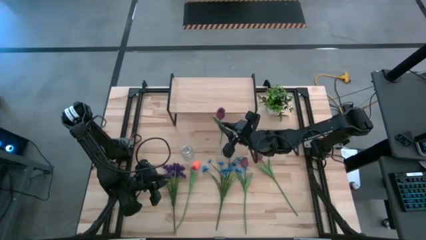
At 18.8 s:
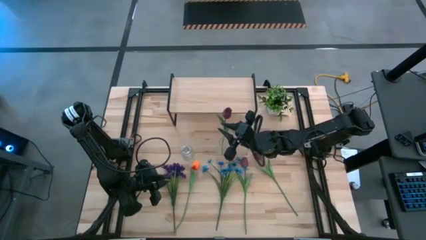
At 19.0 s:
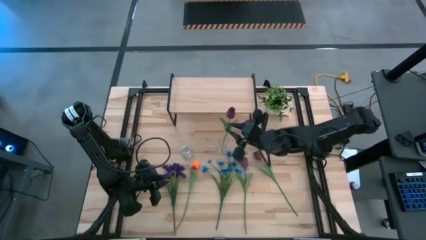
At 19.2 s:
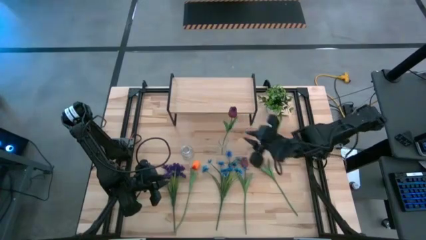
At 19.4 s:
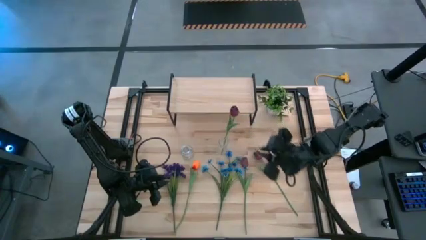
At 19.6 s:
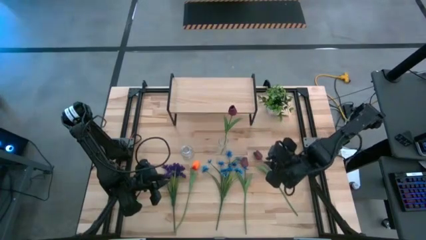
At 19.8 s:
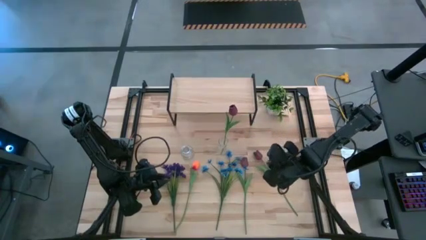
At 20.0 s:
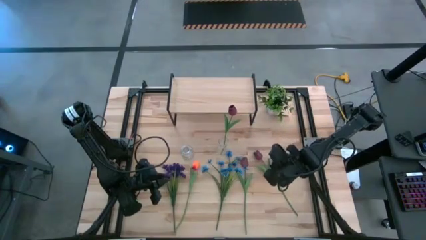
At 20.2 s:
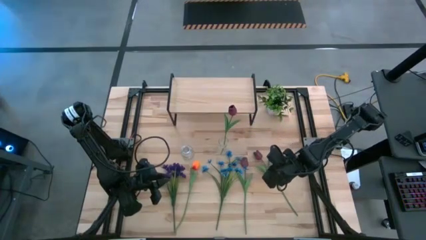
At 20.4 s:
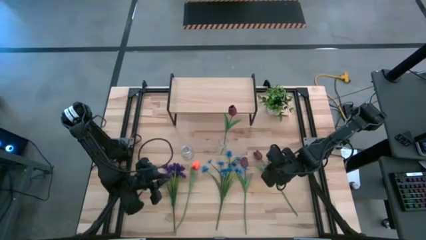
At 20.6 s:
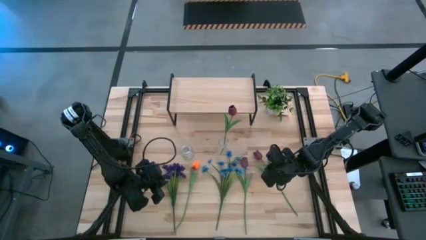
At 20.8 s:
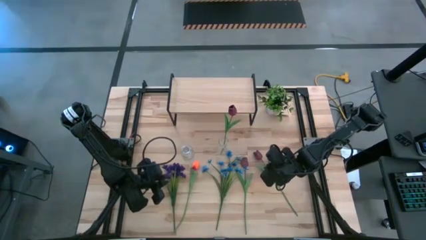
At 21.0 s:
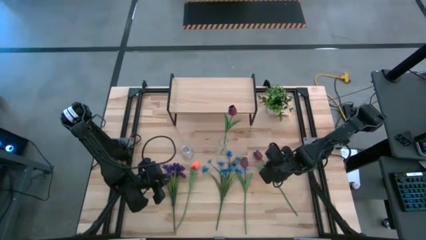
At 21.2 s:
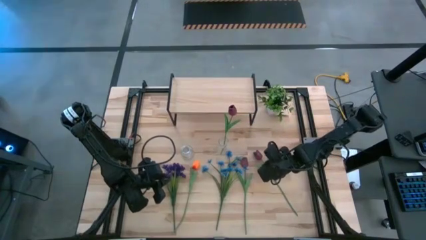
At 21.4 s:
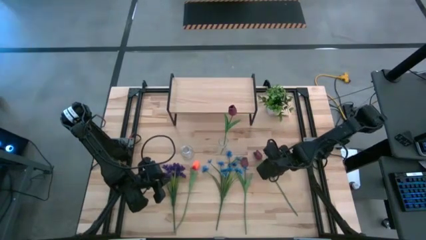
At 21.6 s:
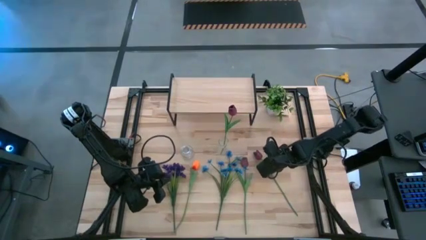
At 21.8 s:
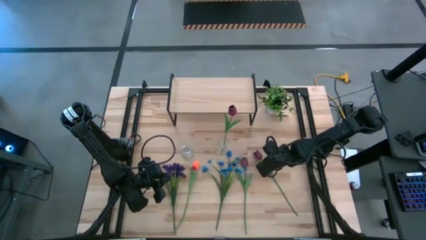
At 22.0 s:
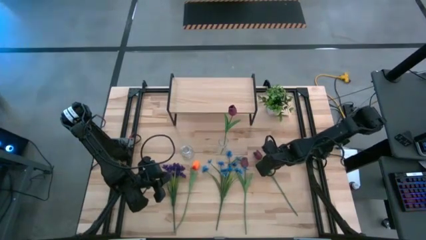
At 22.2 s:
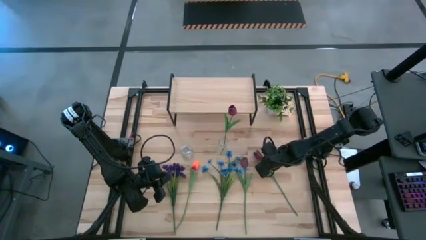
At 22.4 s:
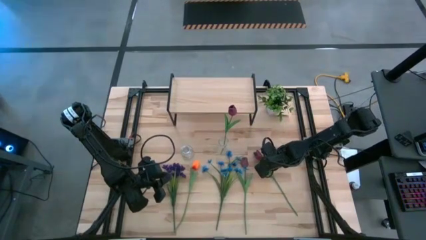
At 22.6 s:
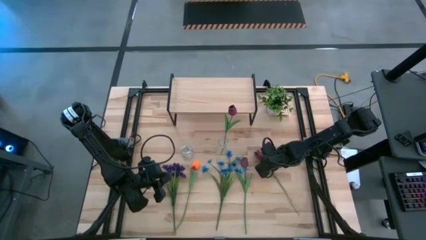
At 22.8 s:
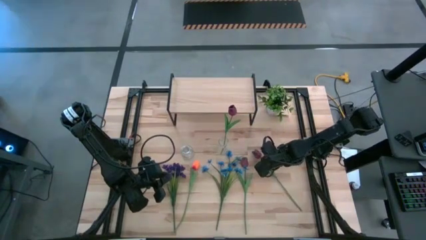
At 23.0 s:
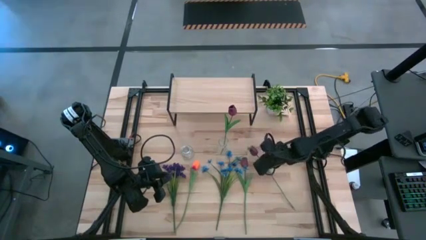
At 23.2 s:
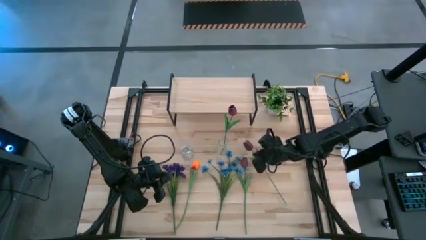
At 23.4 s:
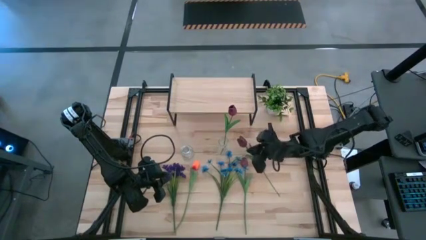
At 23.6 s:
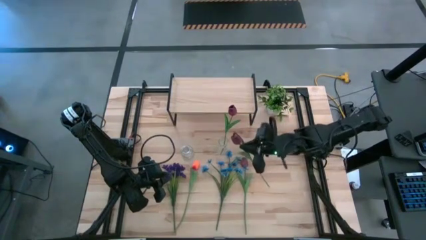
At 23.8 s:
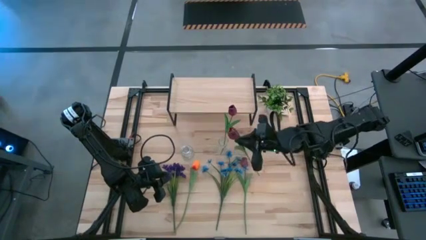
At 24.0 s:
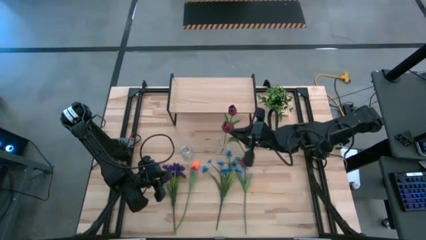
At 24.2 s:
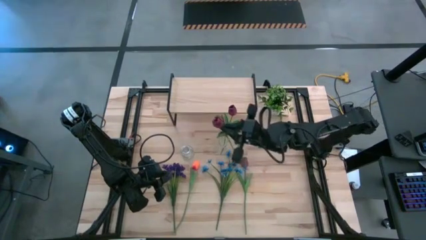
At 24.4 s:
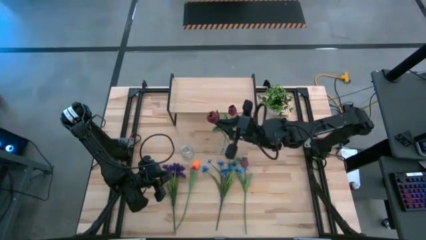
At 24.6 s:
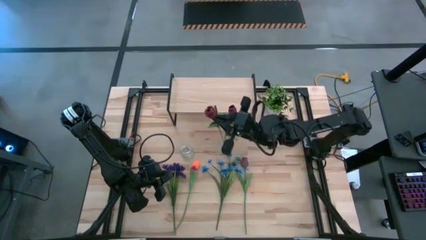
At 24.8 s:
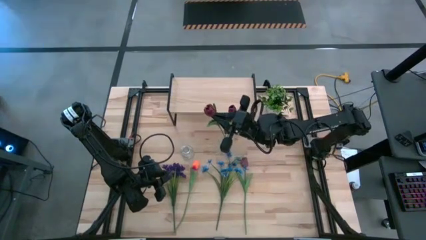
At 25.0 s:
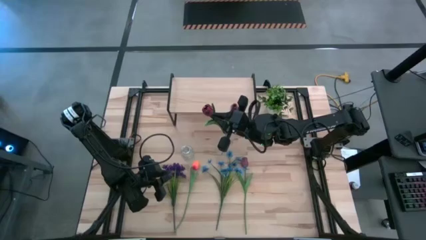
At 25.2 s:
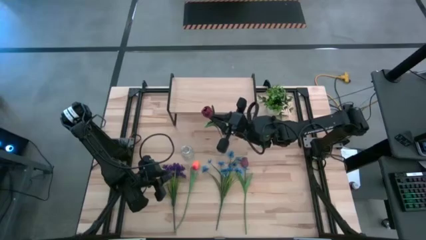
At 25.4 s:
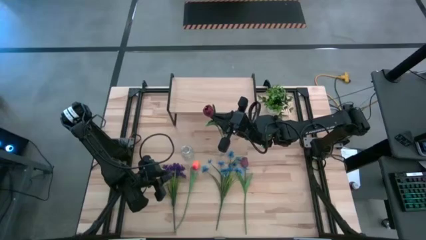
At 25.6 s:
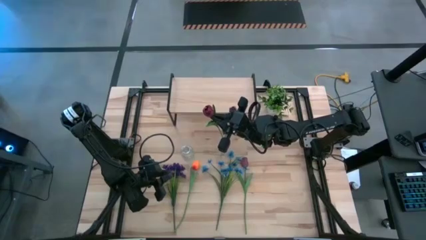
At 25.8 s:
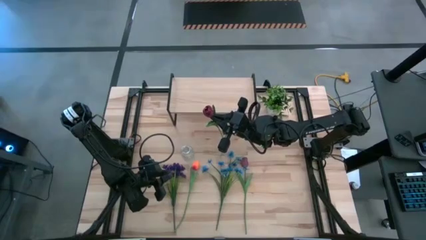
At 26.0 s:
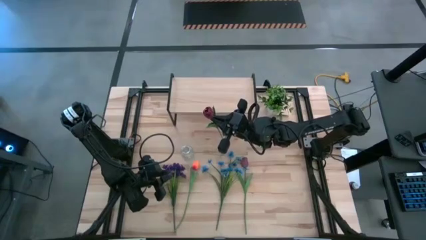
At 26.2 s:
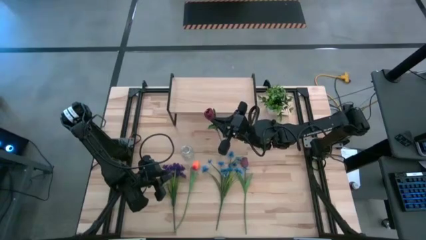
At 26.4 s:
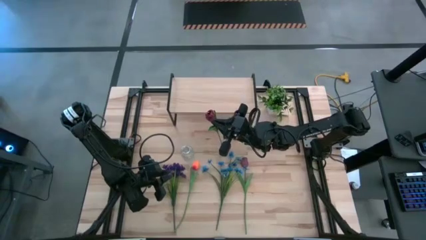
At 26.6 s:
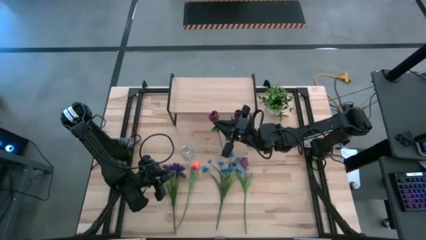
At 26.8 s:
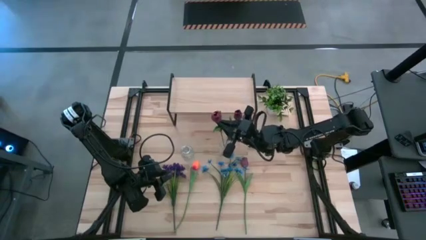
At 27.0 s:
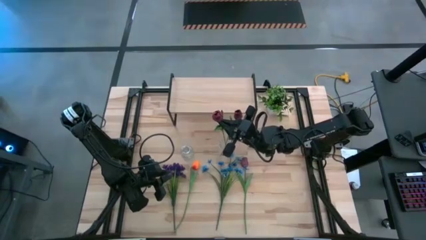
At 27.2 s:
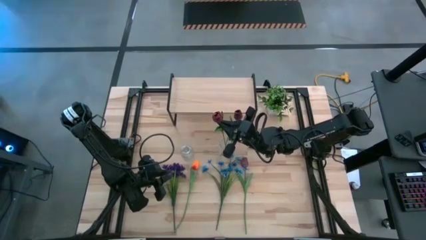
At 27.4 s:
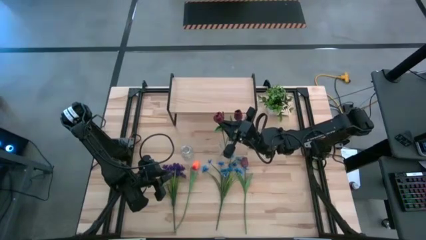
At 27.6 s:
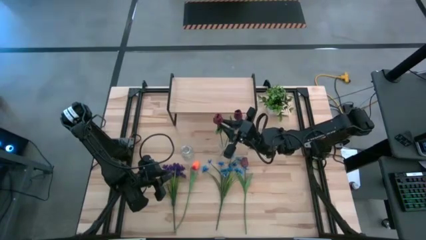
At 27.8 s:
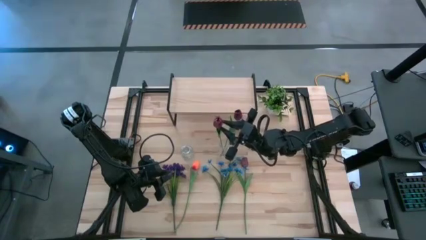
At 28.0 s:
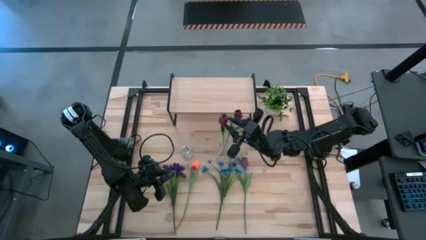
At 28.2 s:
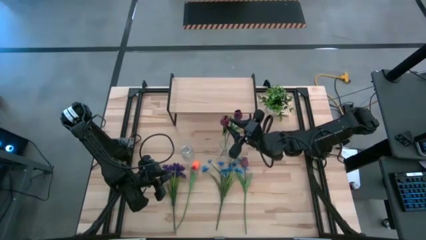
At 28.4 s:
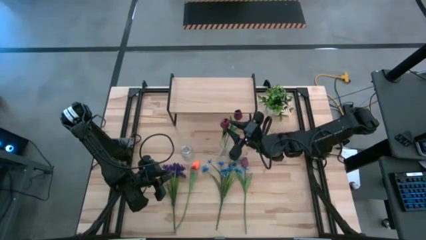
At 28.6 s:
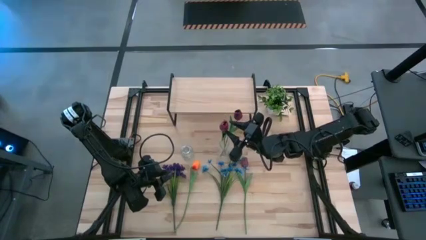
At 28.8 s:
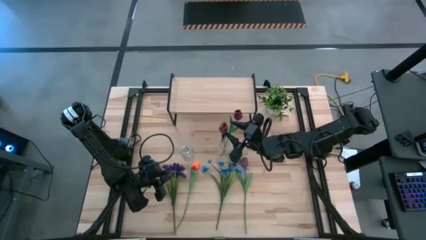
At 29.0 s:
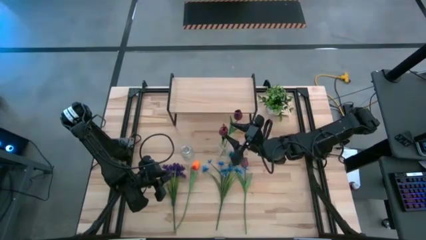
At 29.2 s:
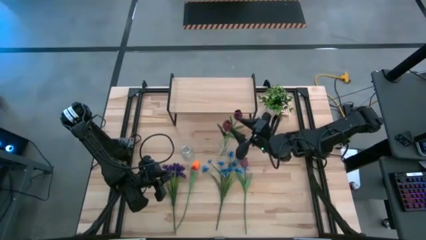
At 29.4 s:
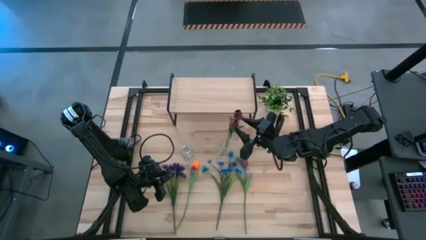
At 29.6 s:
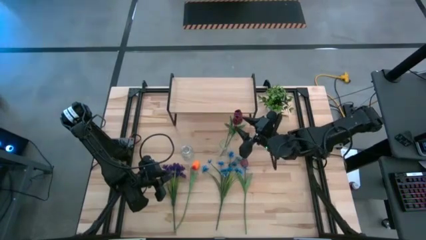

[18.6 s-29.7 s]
Task: Pick and place flowers into a vace then onto a shelf
Put the right red tulip into the right transparent vase

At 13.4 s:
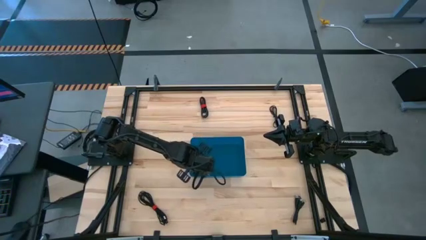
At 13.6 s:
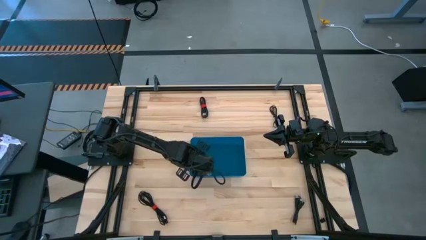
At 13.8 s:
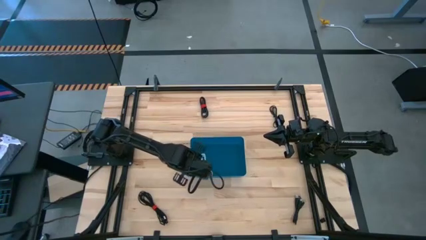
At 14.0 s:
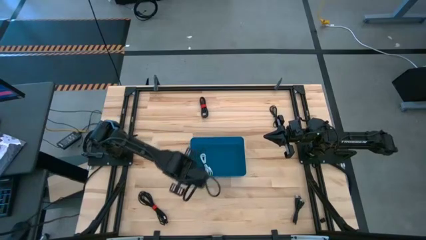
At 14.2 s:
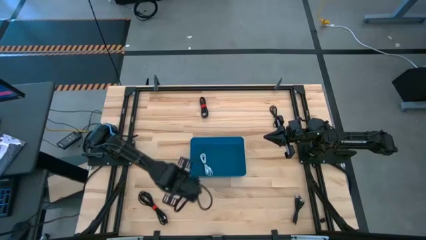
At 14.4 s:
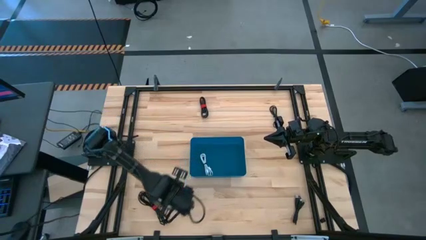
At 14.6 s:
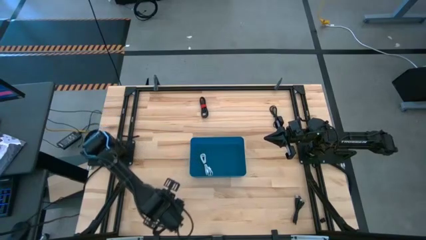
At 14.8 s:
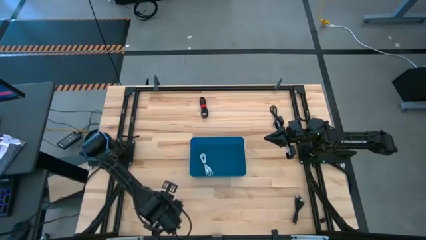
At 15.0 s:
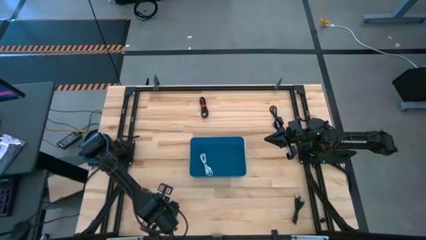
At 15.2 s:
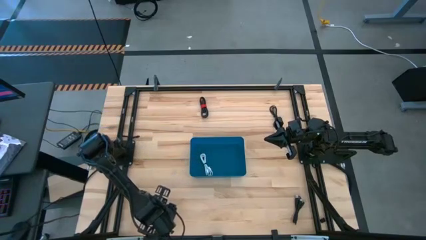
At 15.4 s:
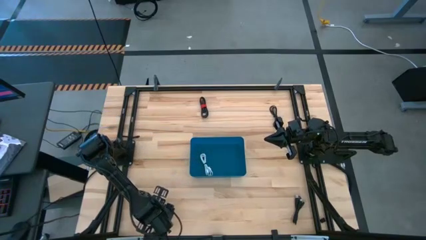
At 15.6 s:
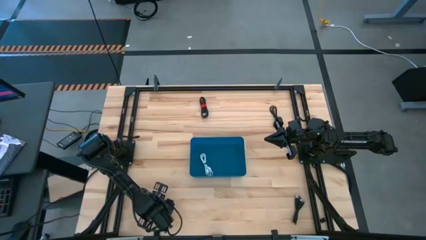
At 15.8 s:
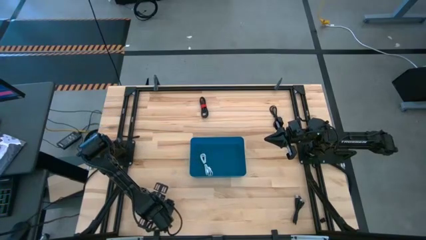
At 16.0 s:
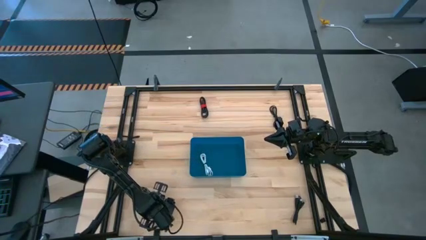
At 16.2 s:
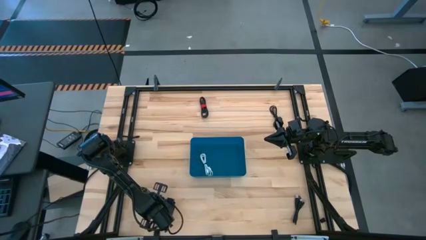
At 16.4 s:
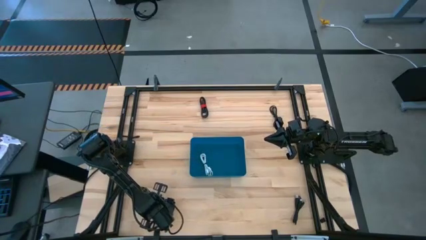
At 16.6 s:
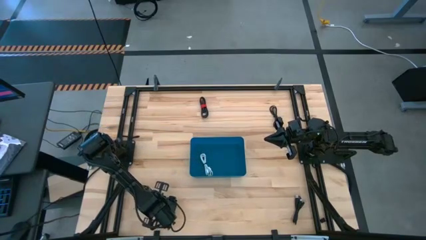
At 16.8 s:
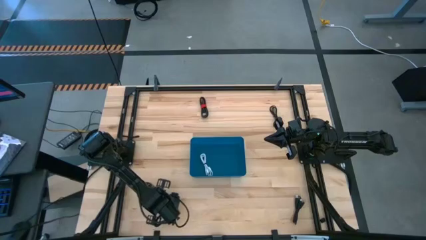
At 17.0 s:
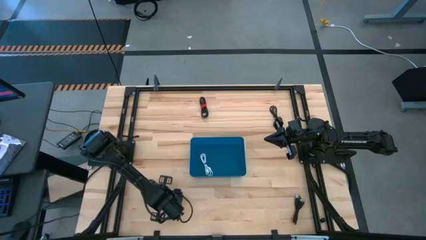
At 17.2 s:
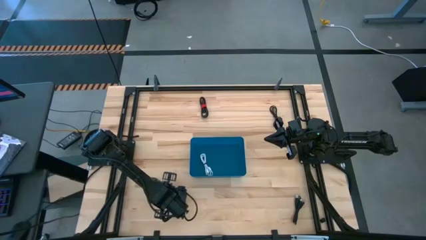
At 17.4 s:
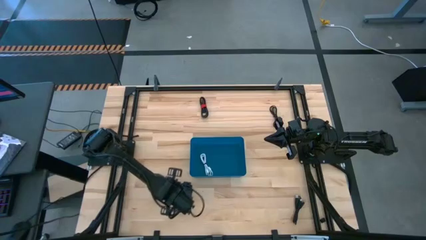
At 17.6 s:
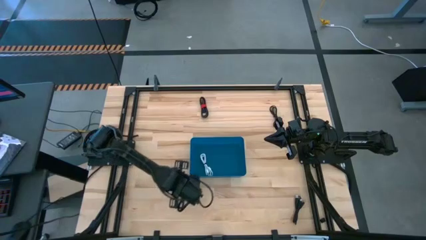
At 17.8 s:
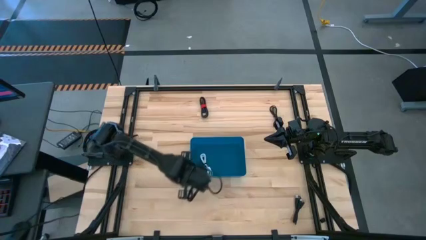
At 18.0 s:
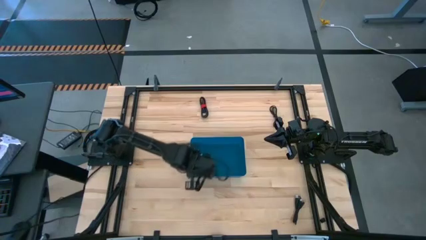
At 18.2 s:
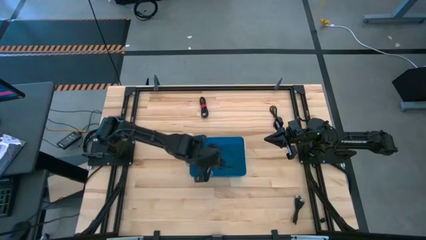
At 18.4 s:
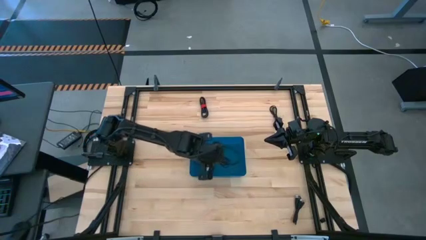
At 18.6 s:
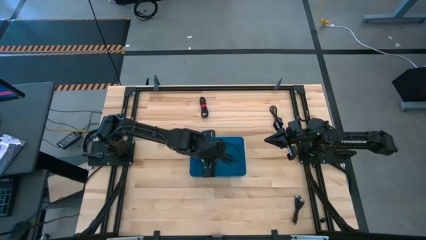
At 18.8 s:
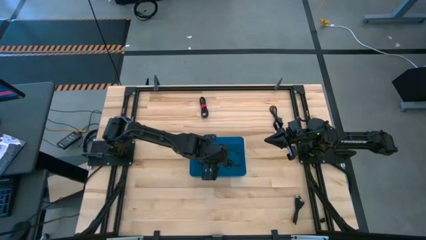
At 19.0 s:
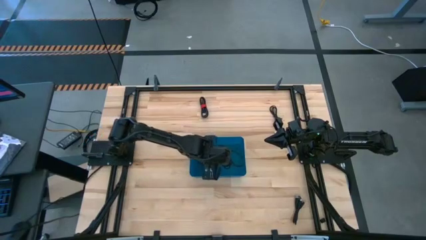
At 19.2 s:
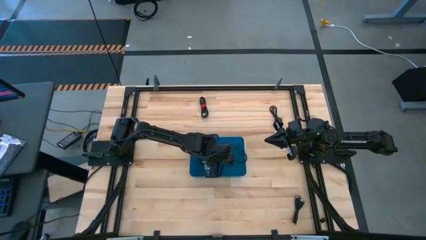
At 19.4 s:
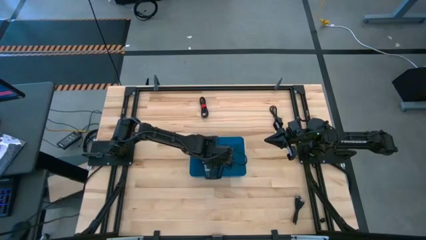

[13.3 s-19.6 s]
Task: Pick and place USB-C Cables
Put the black cable charger into the blue bin
